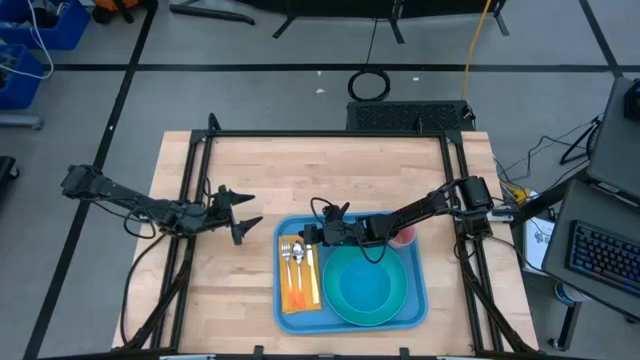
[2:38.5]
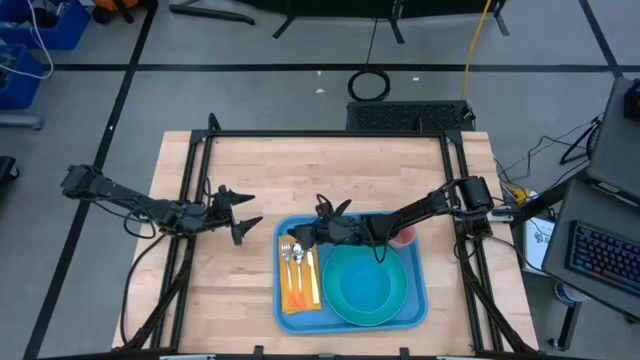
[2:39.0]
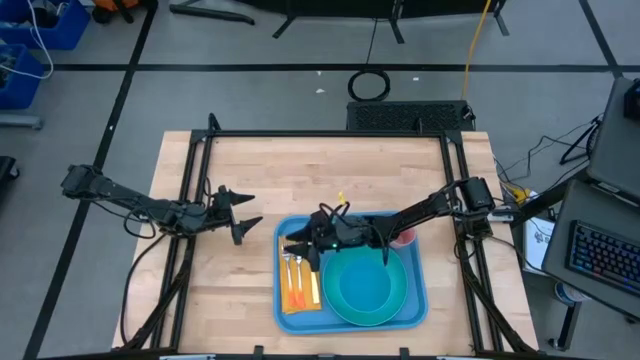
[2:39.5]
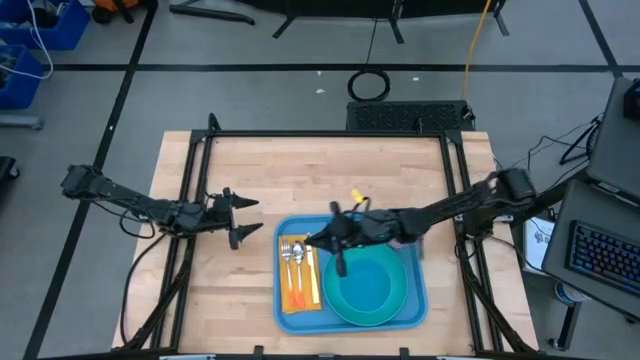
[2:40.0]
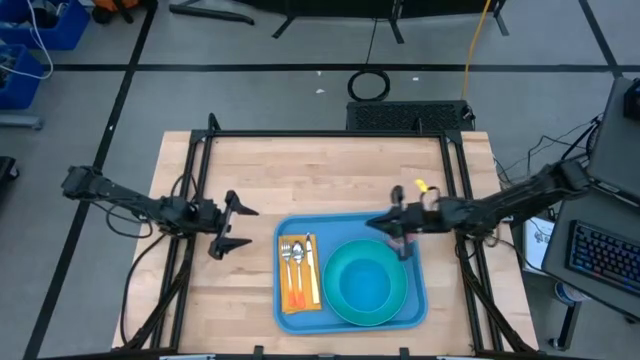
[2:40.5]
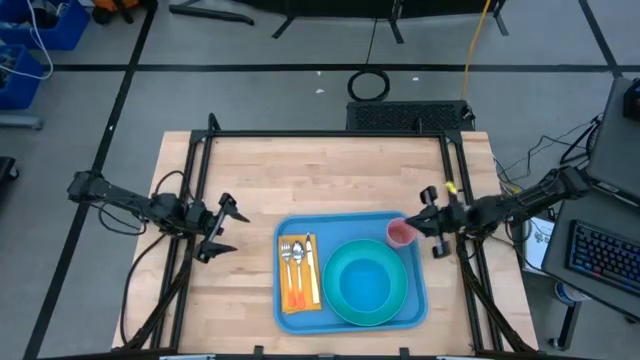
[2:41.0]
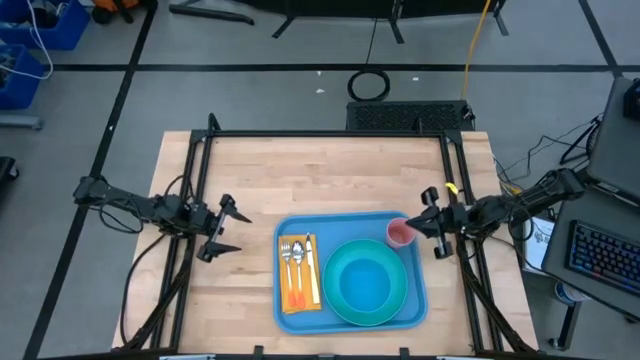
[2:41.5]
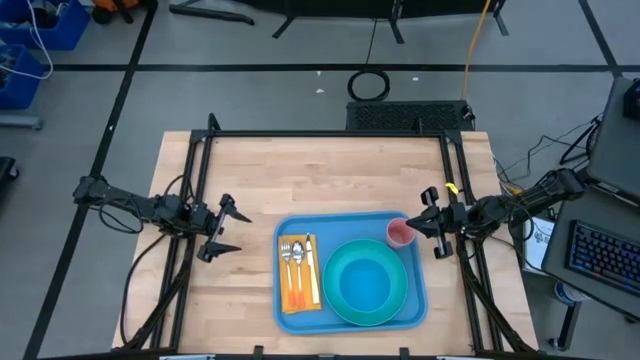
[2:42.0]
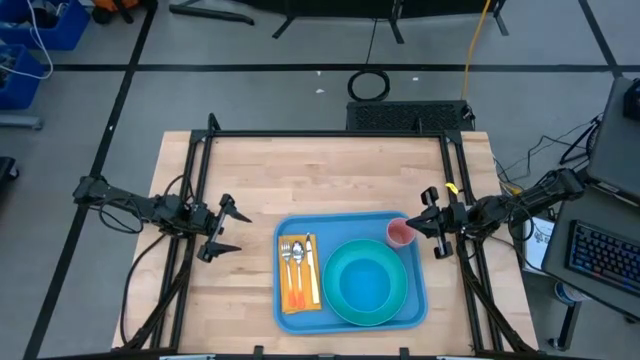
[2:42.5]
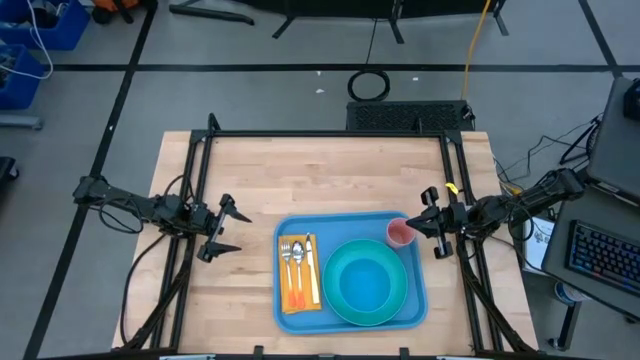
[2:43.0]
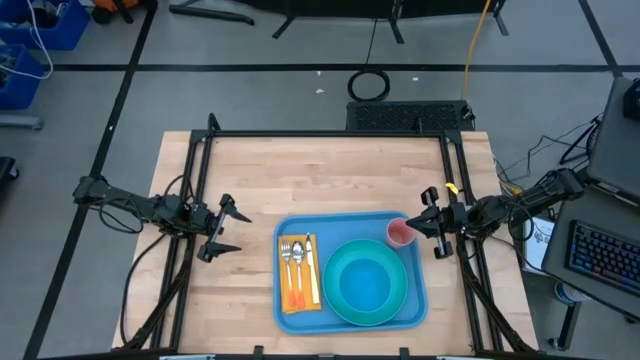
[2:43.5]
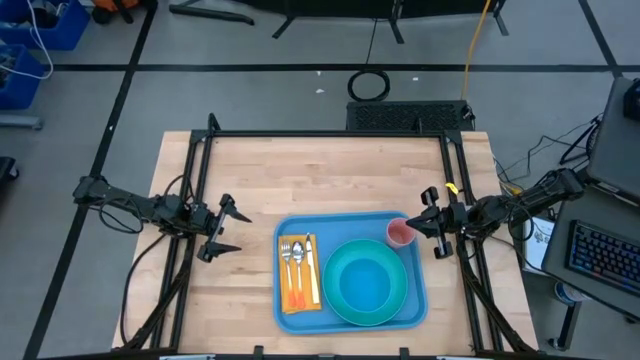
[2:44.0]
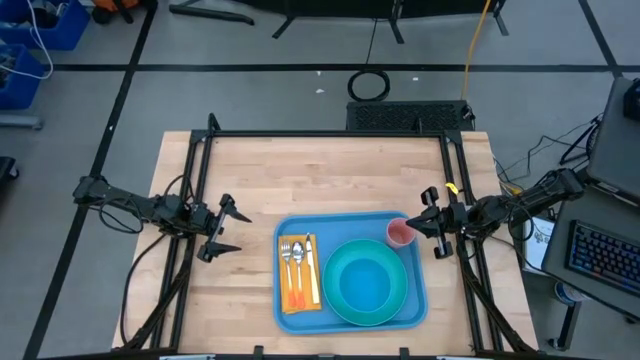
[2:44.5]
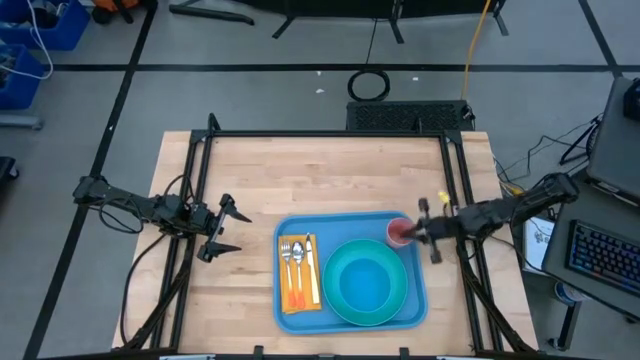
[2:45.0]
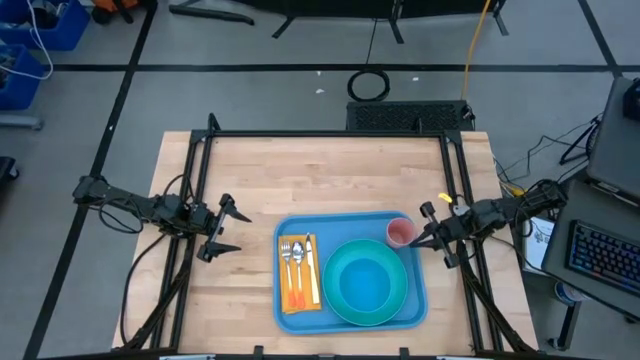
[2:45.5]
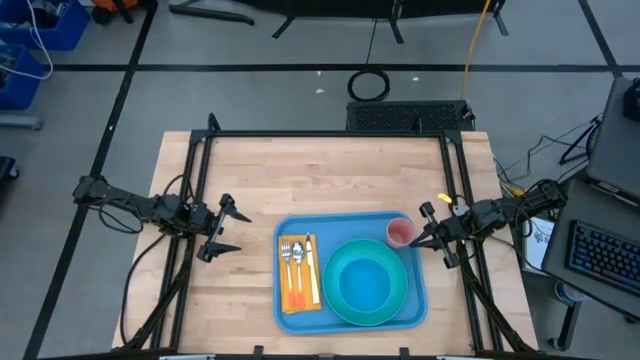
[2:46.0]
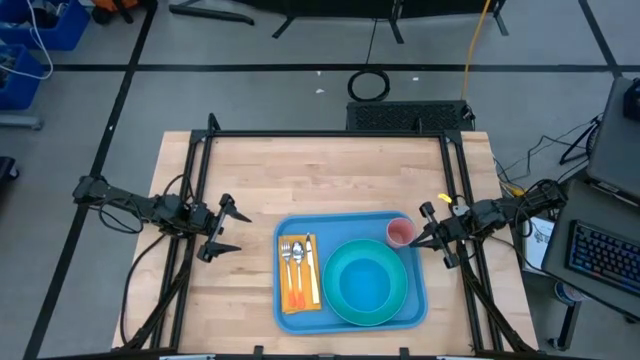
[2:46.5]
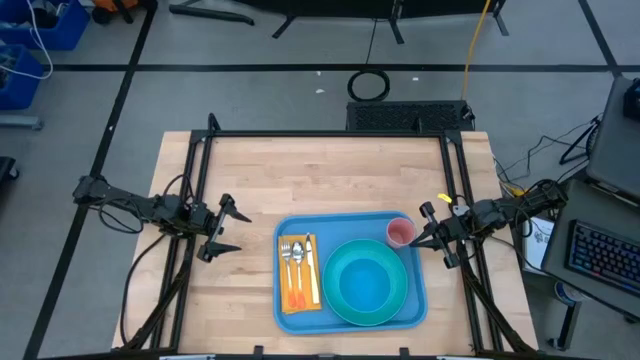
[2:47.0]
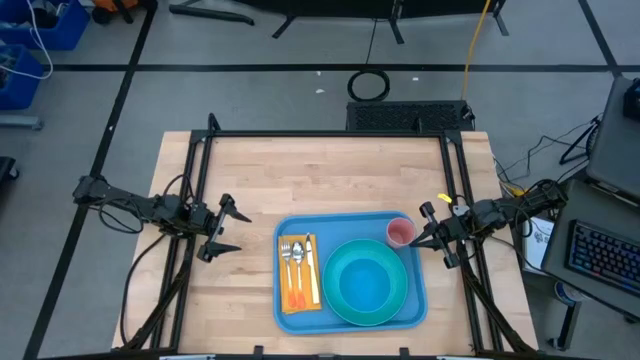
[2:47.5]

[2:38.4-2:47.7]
Task: Set up tray
Return to Home Position

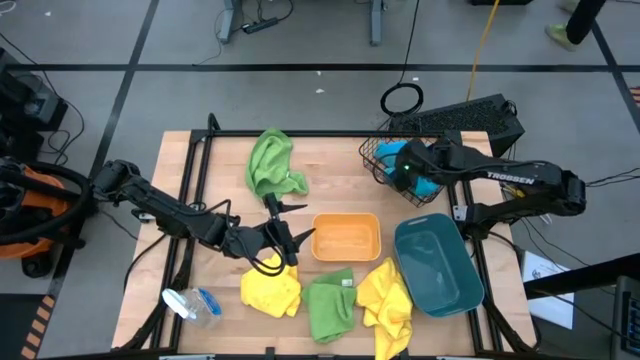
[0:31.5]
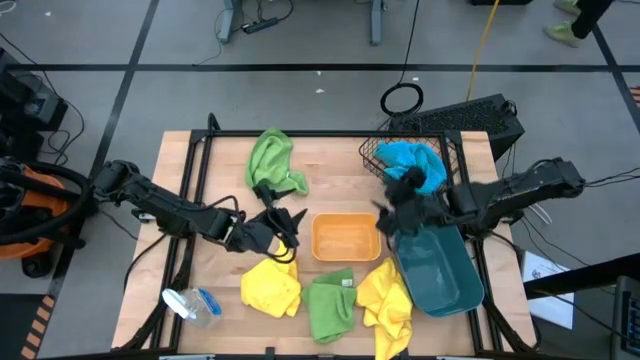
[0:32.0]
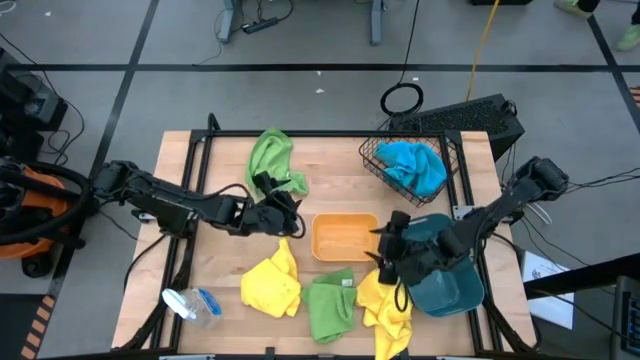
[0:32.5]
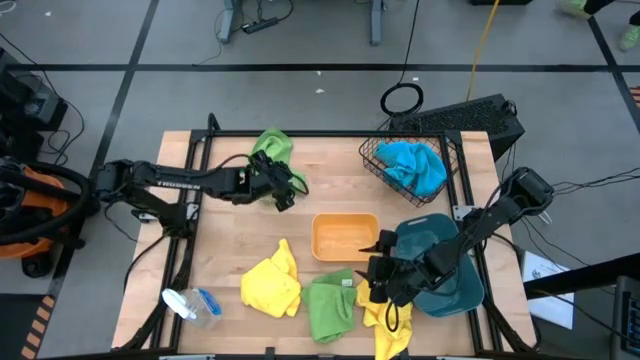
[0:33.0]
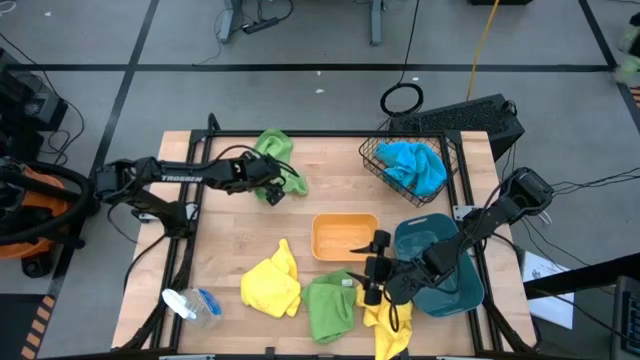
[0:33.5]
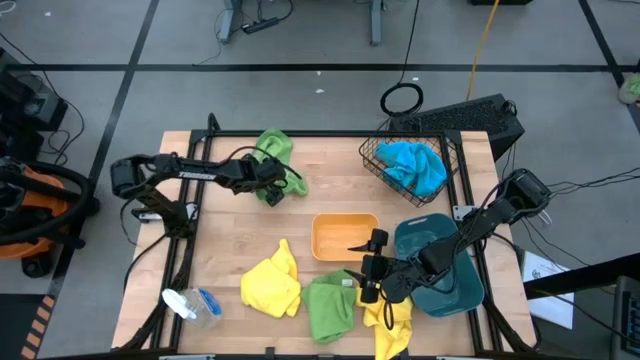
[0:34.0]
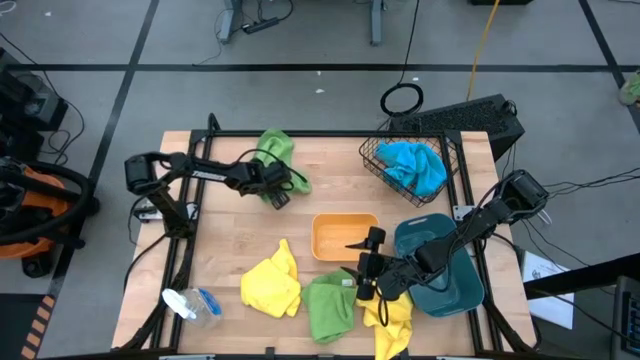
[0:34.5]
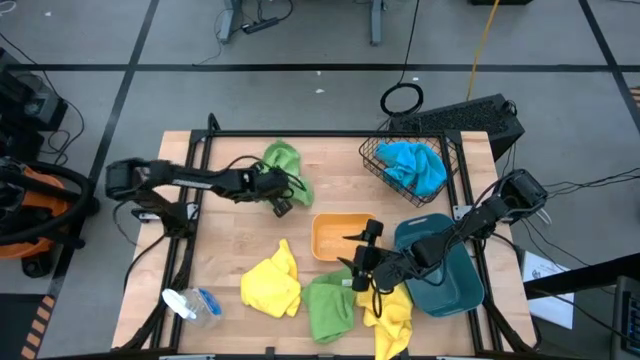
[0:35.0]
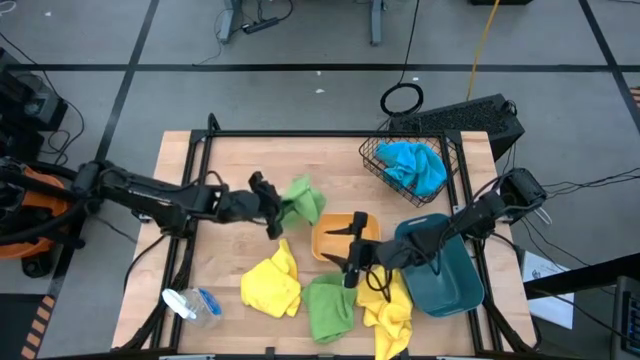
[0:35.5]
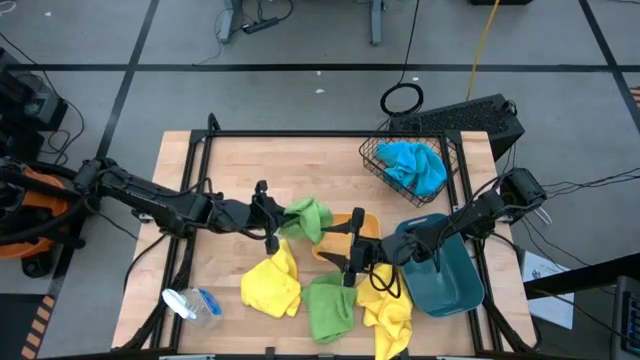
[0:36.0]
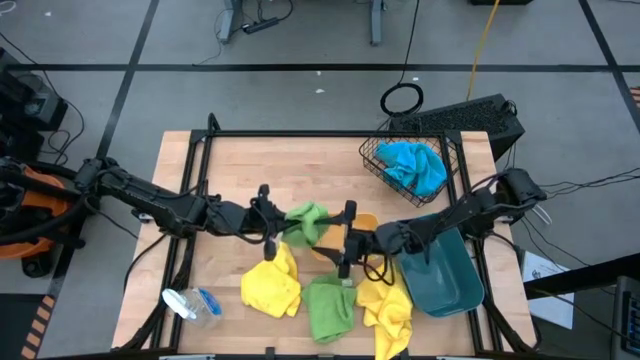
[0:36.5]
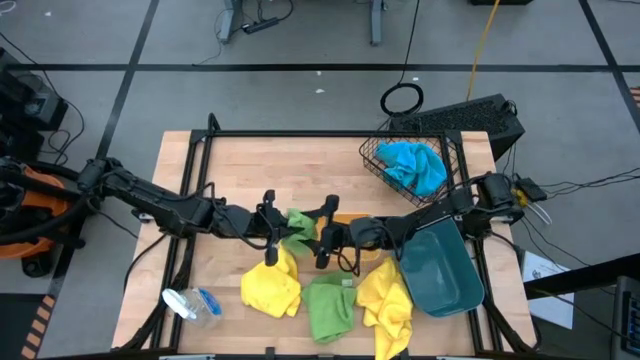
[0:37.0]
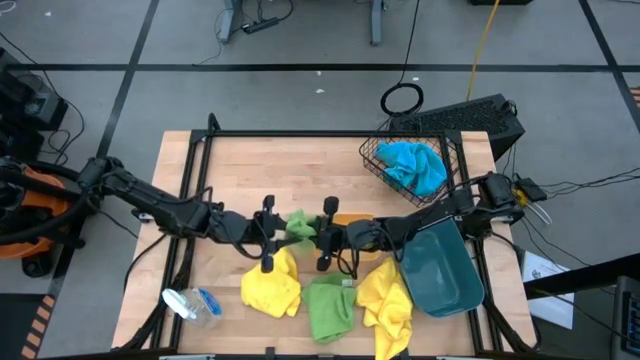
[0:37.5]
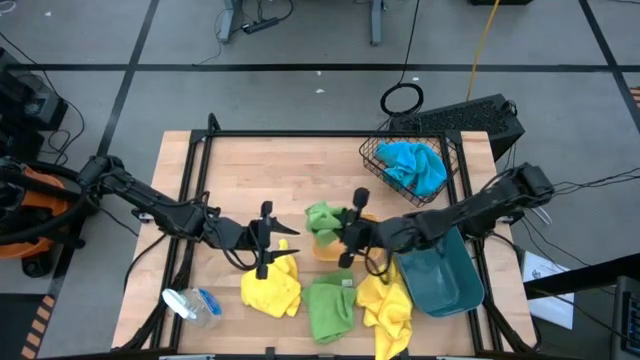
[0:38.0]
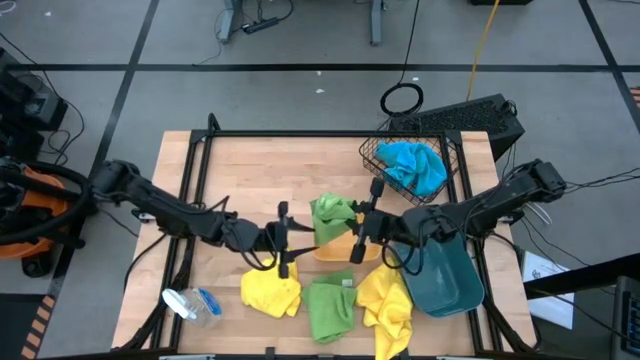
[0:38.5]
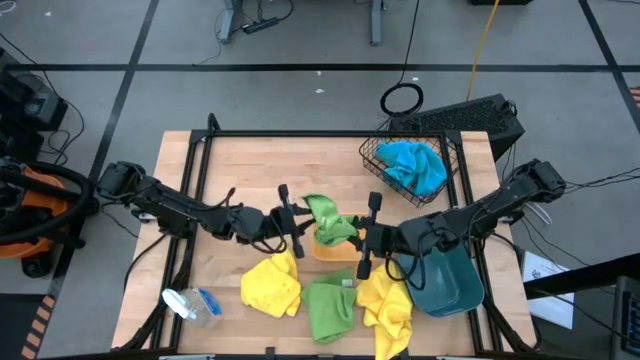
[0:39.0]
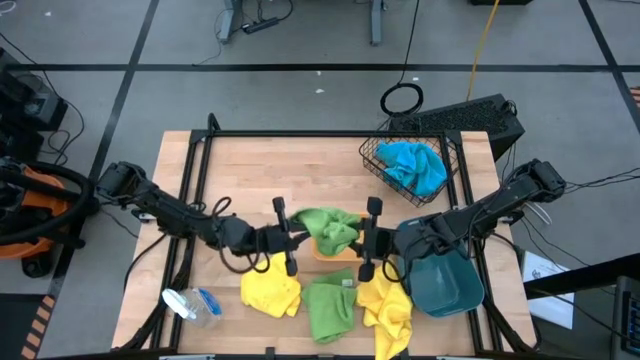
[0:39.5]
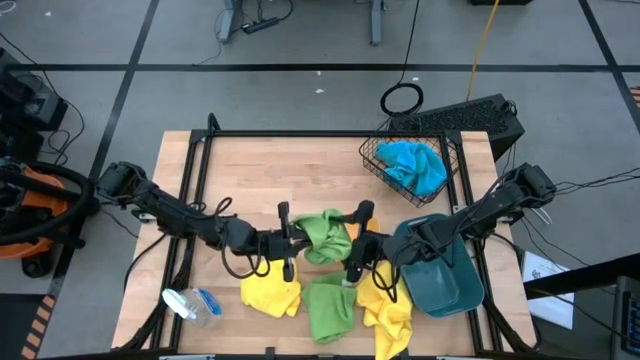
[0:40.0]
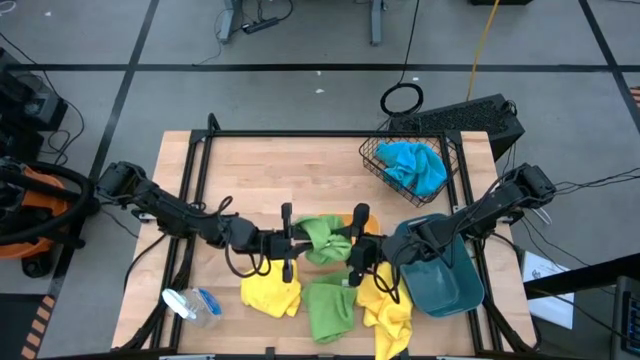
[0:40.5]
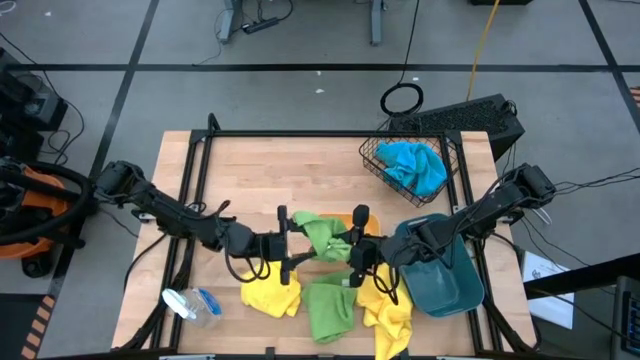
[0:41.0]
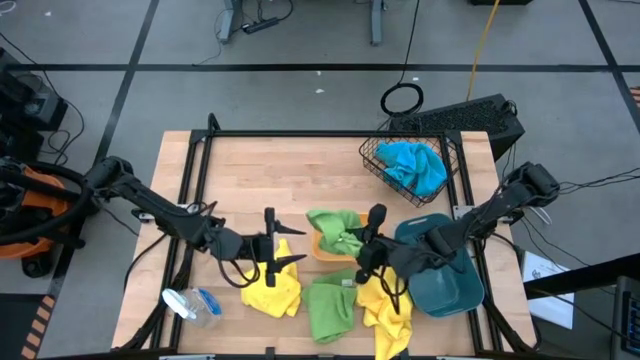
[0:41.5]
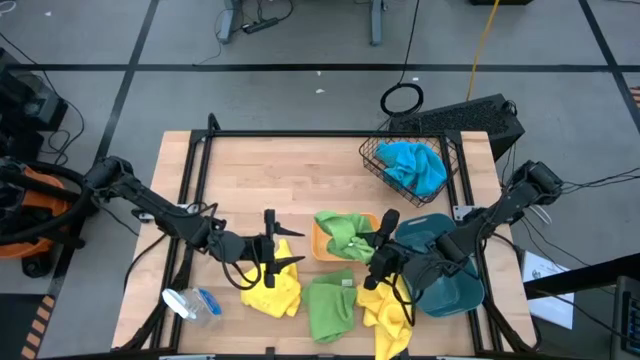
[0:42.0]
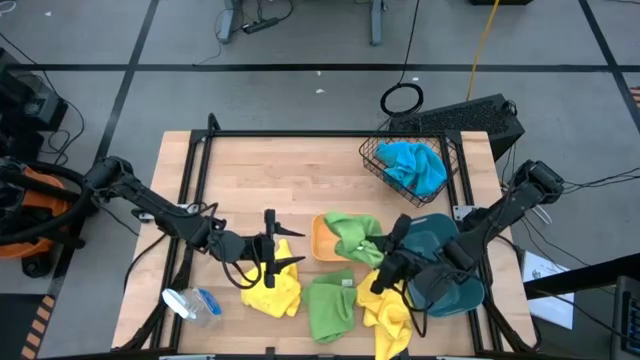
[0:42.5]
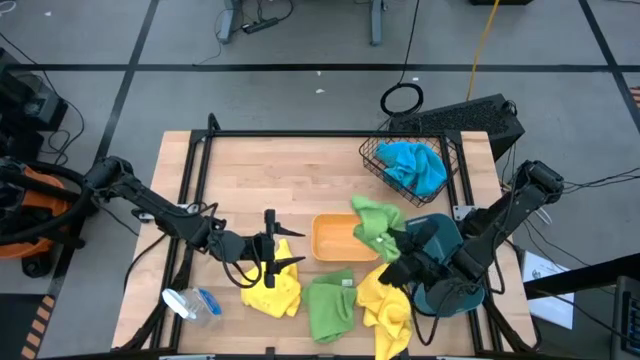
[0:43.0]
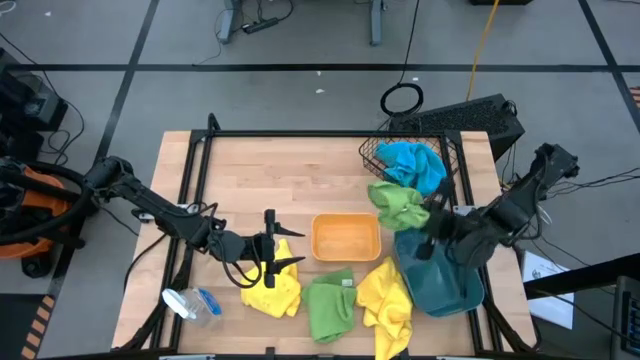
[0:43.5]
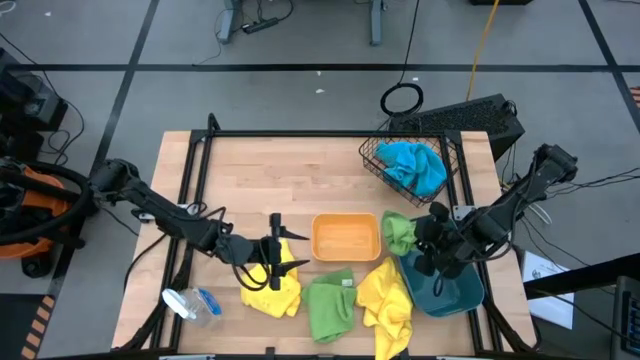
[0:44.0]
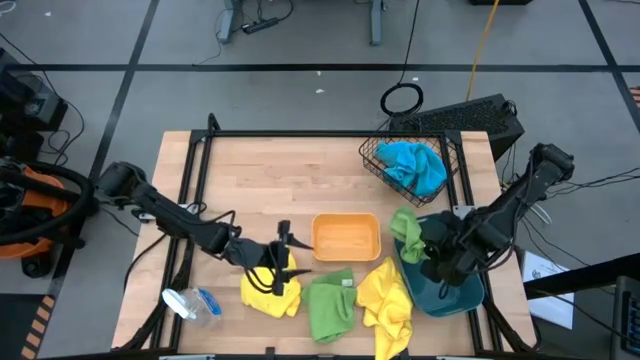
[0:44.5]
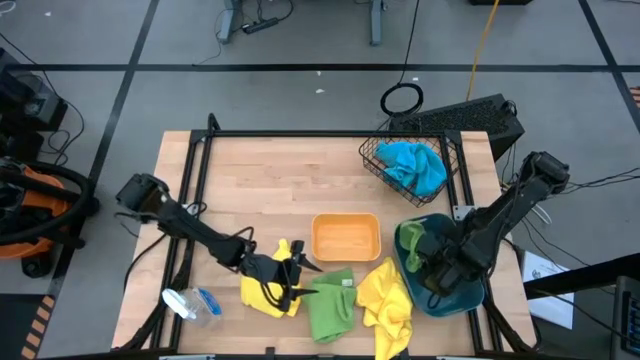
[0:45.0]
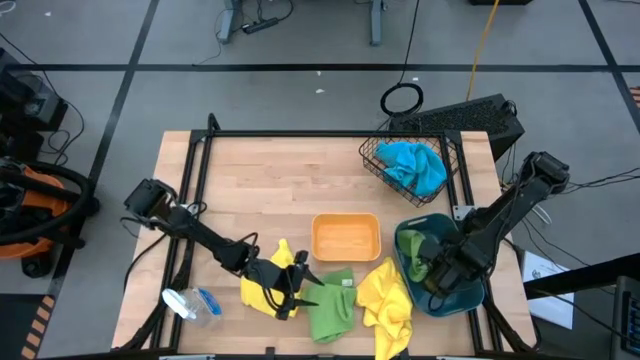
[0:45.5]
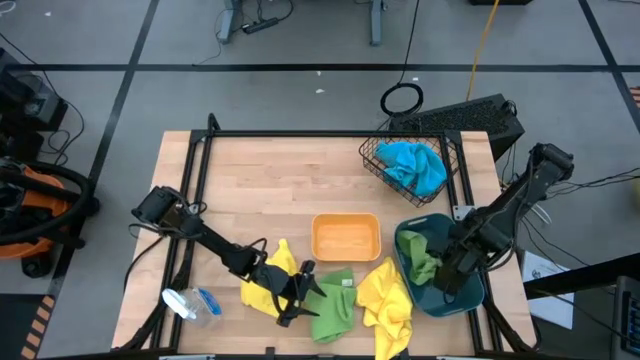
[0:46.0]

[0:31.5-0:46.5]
Task: Sort microfiber towel by color & place in baskets
Put the top green microfiber cloth into the blue bin
